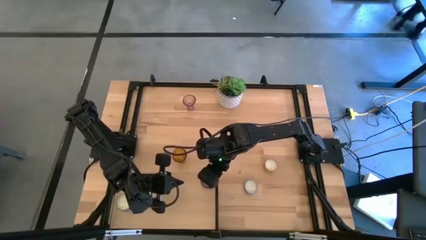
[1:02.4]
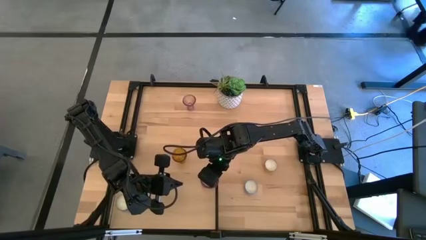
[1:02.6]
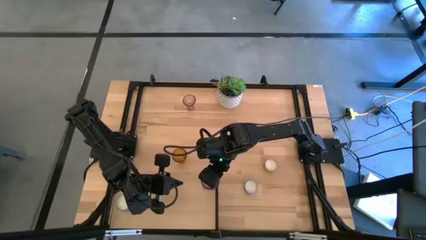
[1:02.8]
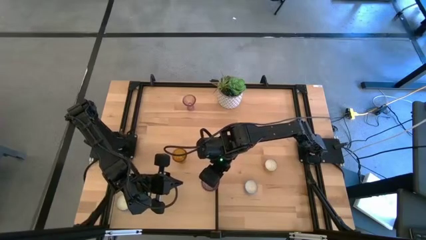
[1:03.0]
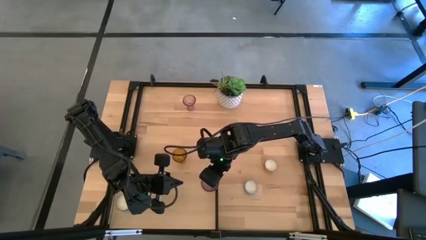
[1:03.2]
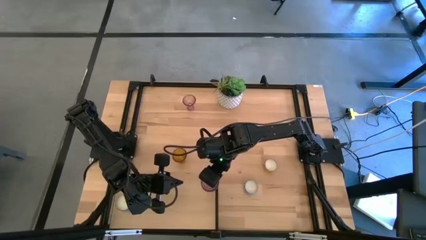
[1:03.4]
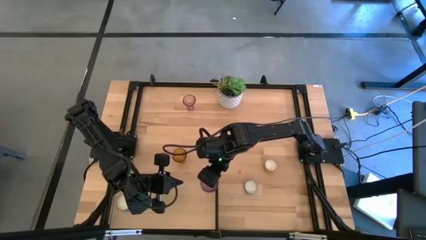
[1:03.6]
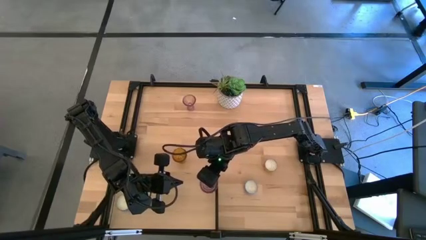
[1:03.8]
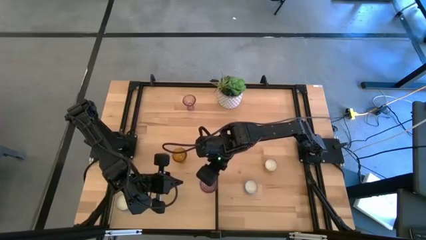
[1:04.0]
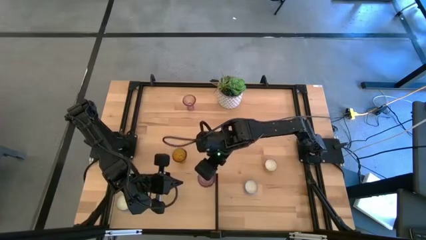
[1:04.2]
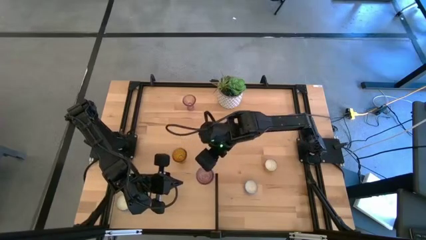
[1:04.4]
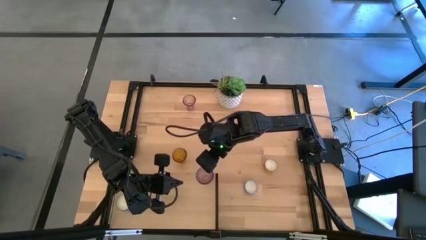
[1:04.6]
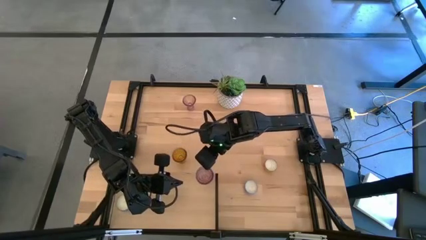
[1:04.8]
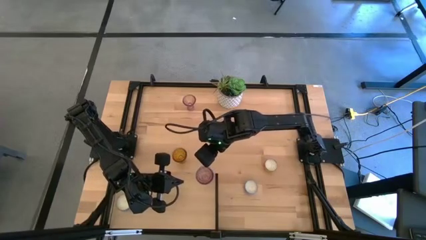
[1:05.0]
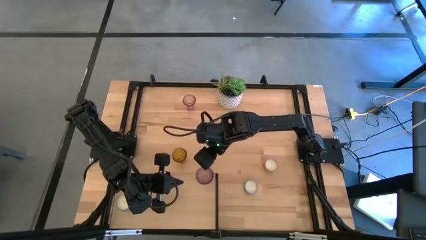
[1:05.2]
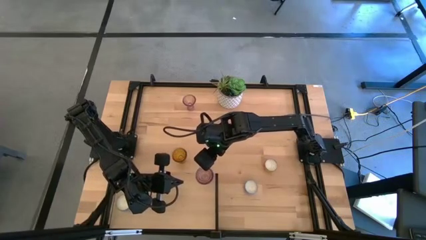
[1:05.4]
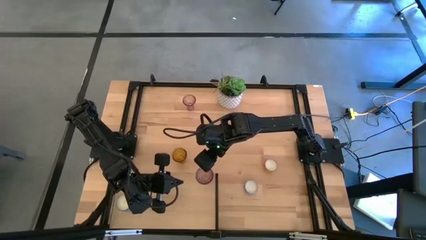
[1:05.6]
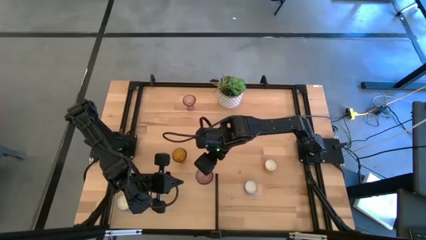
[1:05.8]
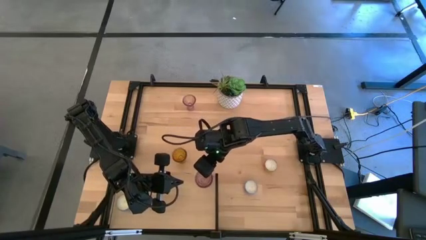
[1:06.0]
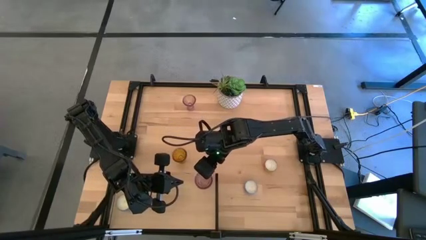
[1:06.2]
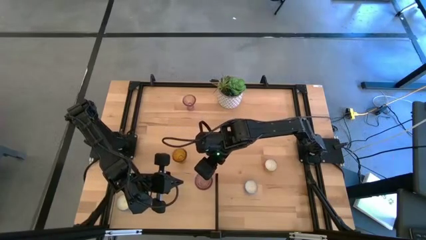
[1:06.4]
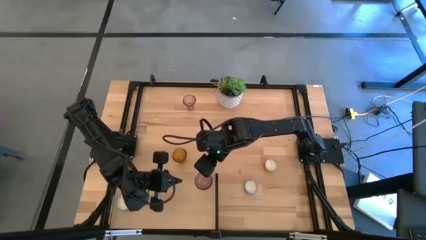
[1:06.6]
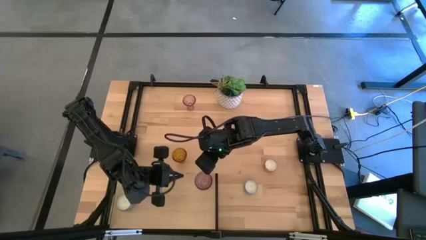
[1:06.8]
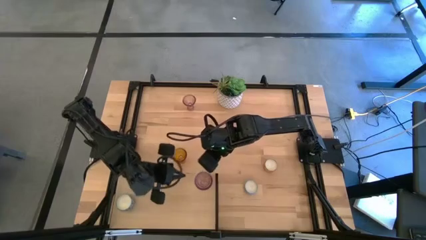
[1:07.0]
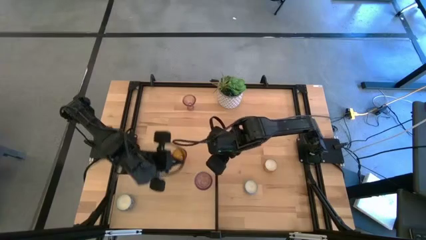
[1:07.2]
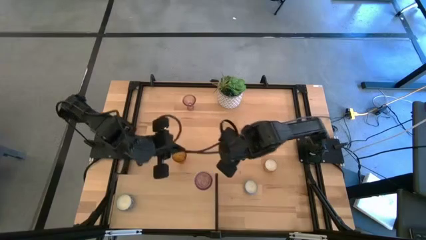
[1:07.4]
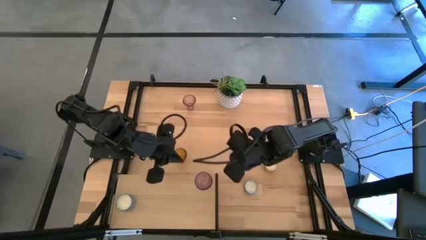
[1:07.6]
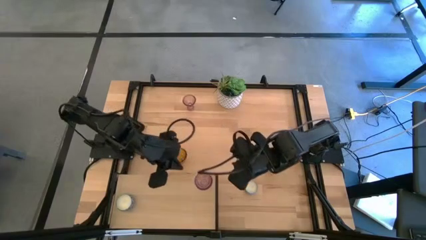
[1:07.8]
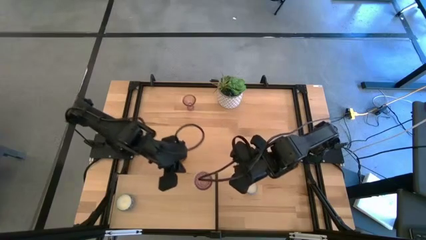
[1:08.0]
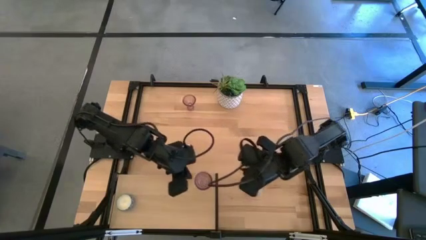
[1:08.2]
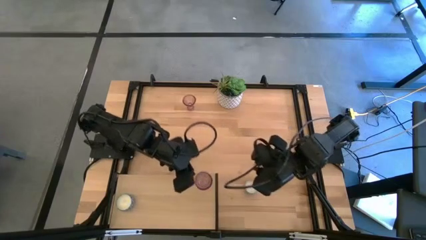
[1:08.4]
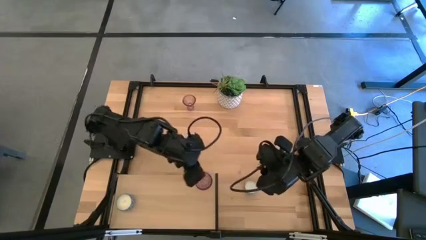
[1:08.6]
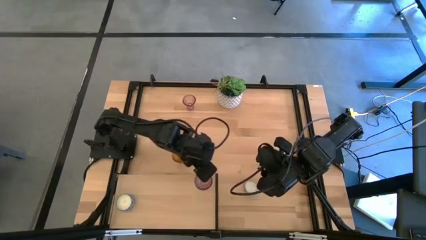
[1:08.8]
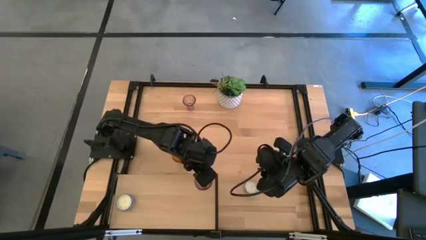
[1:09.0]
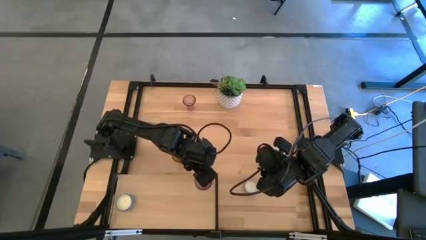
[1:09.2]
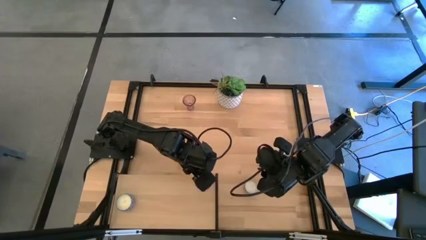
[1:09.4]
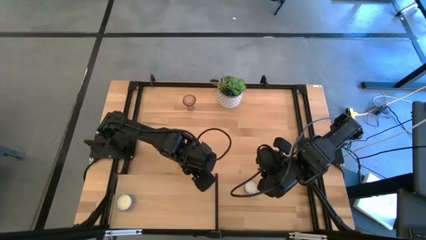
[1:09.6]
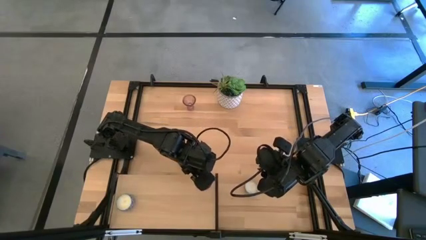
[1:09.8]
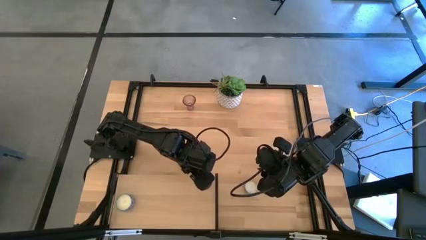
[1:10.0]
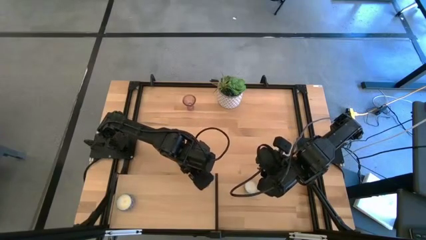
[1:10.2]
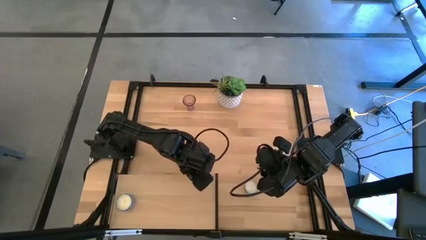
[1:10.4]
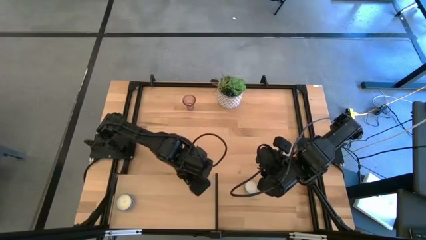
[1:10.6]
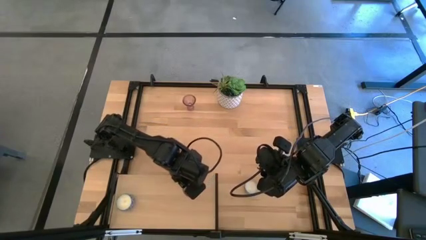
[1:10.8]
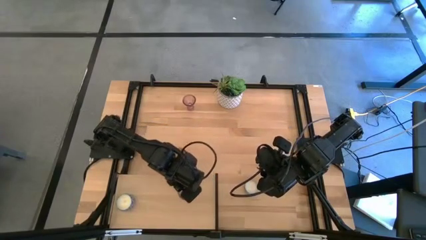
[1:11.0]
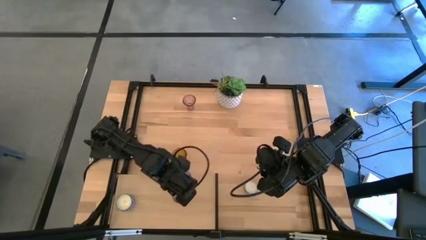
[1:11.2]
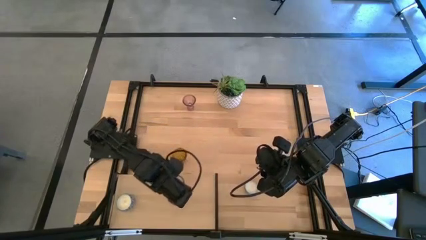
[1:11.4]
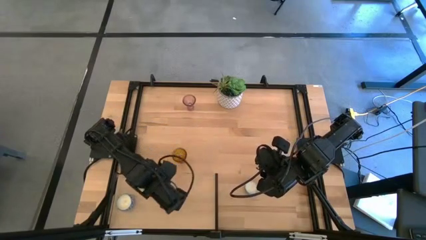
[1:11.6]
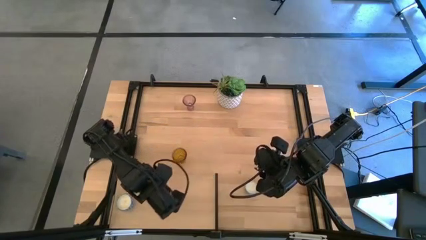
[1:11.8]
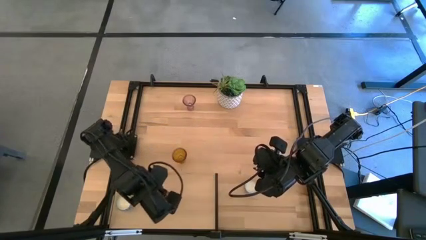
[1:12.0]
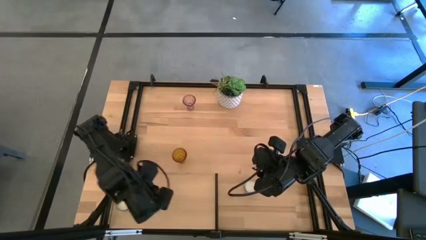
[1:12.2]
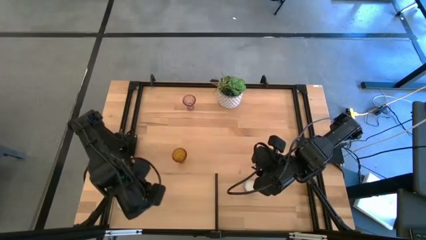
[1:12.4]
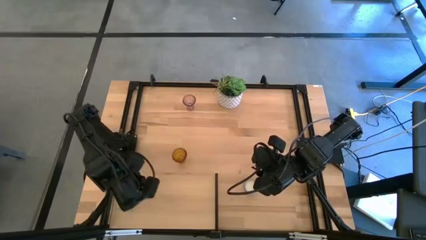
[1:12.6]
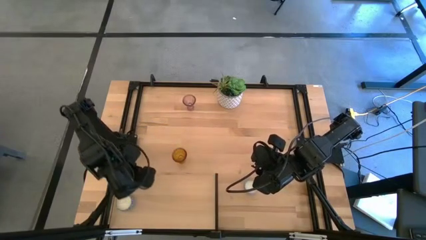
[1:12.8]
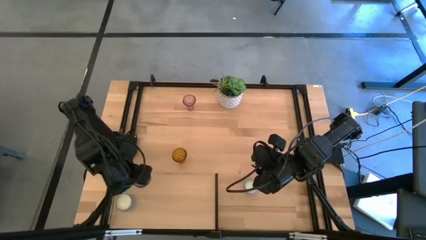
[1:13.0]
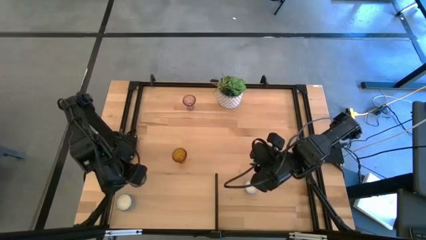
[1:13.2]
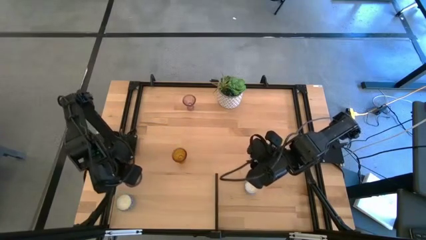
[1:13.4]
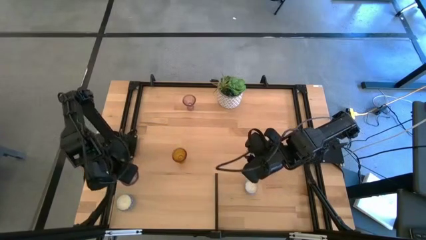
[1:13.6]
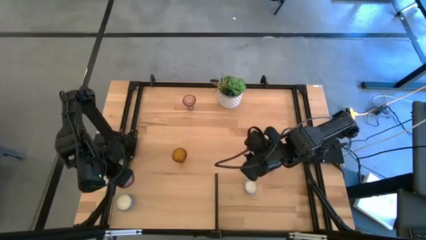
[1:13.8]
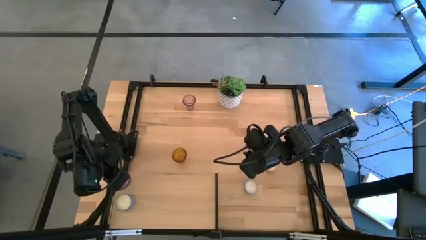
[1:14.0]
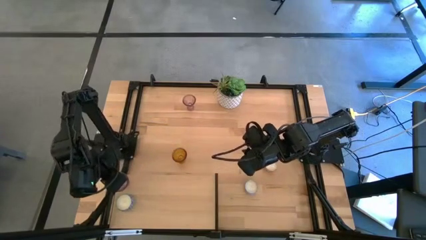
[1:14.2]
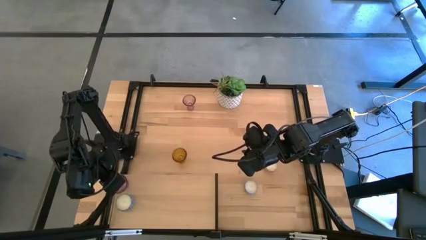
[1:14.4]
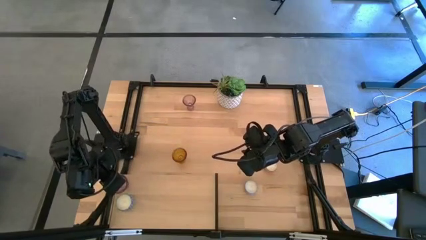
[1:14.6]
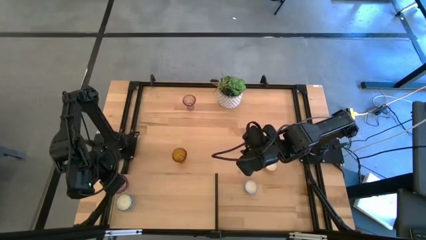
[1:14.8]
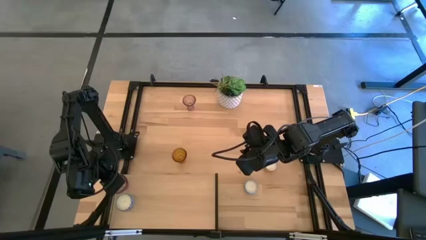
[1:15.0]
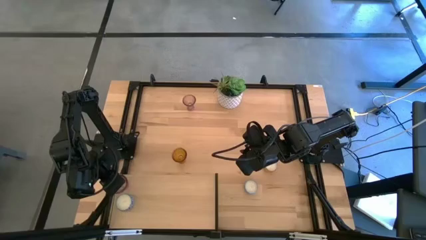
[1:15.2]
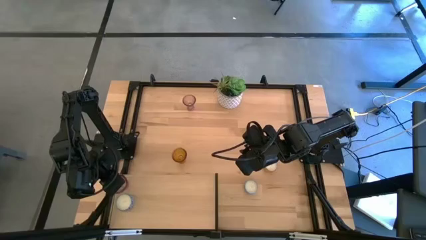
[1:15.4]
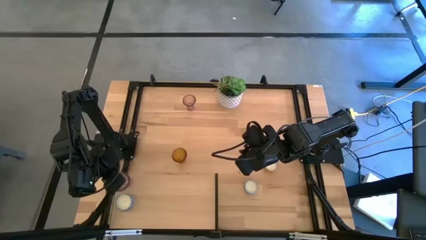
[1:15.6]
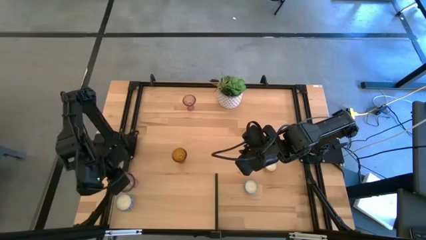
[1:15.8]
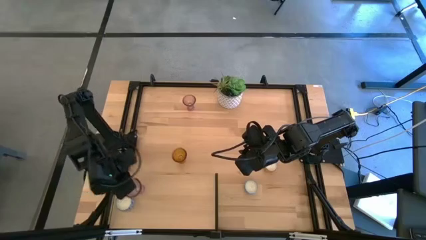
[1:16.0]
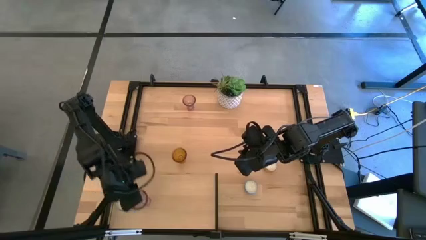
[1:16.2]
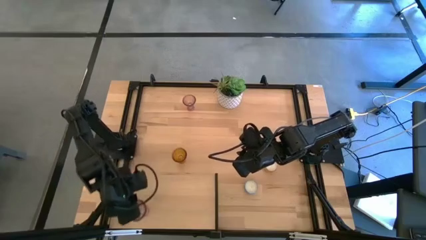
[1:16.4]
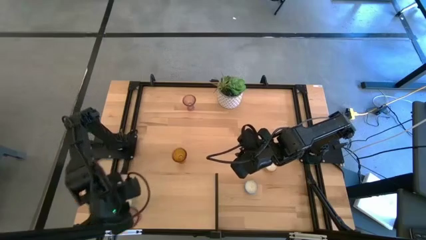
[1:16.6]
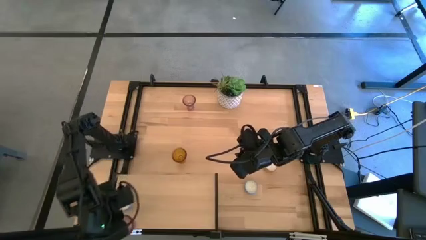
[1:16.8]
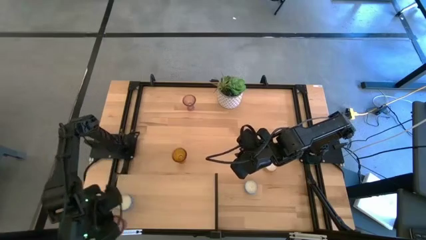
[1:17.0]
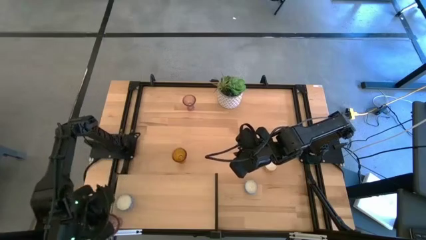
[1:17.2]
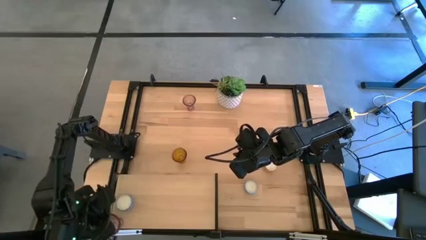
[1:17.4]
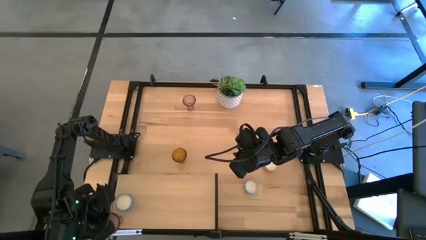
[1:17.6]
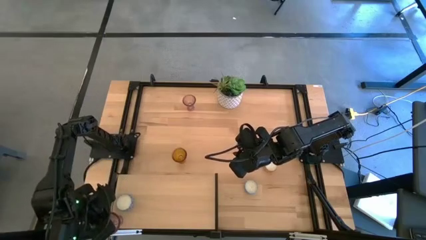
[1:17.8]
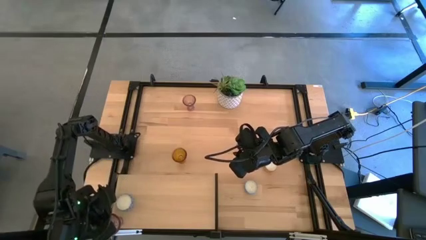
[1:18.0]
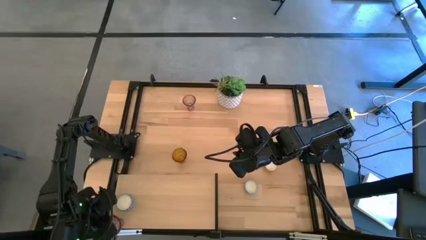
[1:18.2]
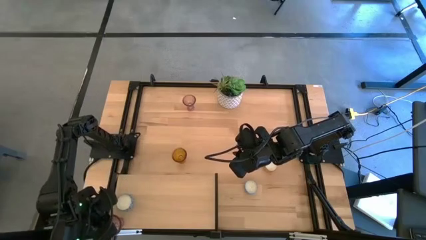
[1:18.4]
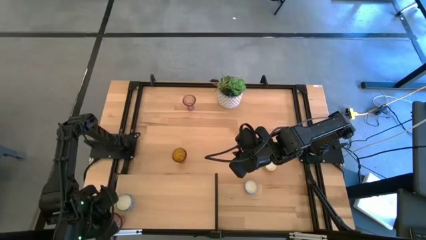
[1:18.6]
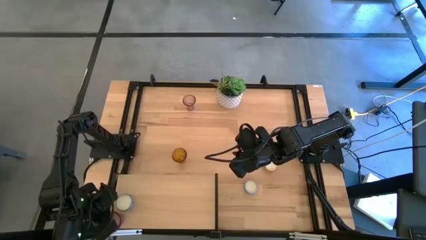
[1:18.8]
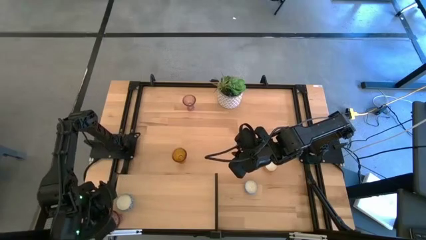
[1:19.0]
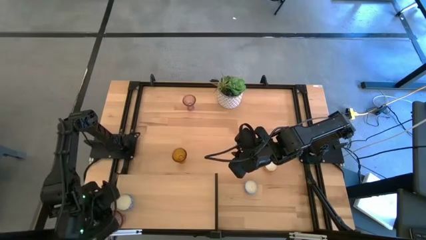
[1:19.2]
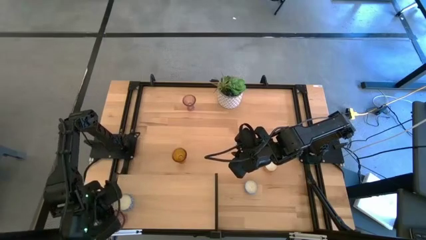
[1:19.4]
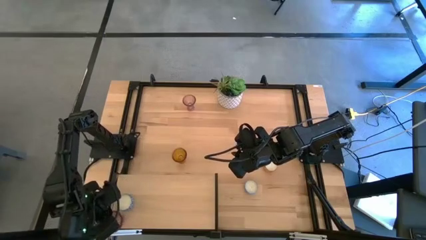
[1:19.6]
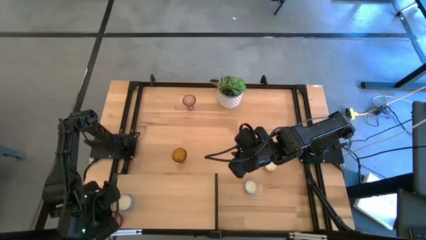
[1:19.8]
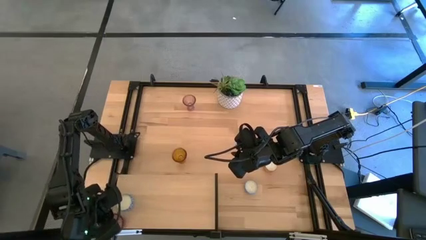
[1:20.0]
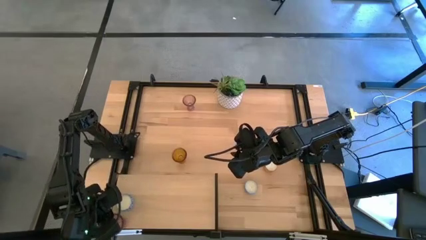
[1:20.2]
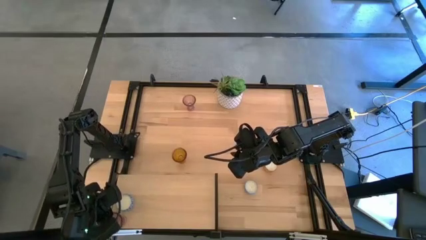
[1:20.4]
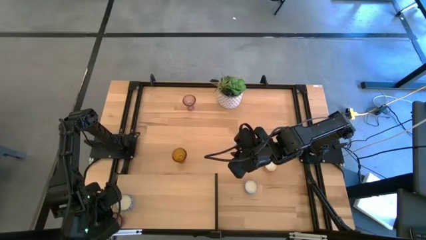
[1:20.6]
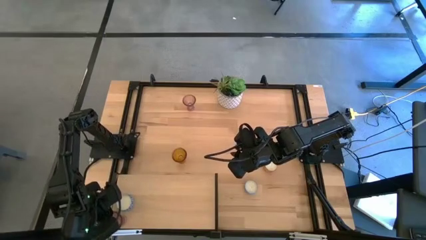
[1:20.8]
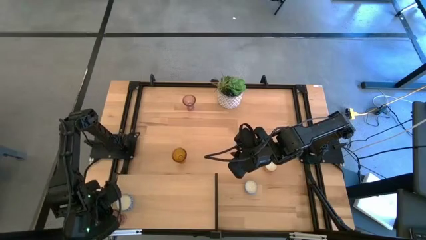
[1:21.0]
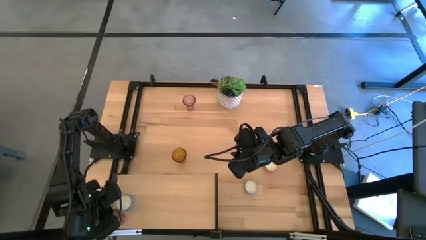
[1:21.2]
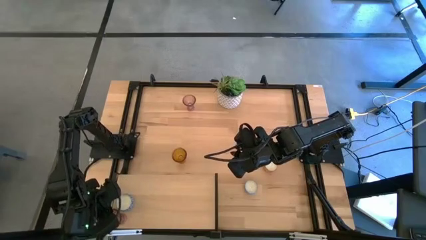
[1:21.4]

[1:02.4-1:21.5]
Task: Pick & Place candle stick holders
Put the bottom pink glass on the shelf
